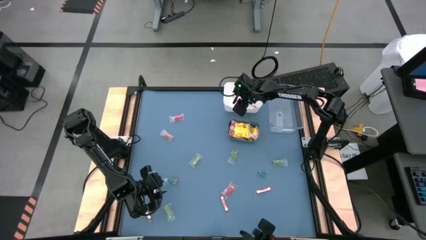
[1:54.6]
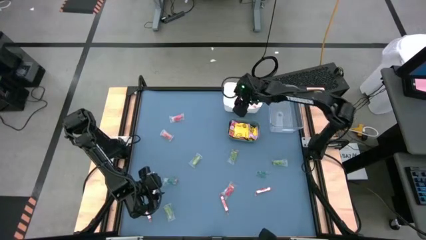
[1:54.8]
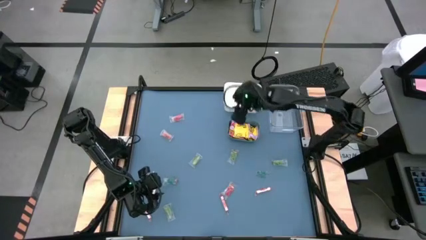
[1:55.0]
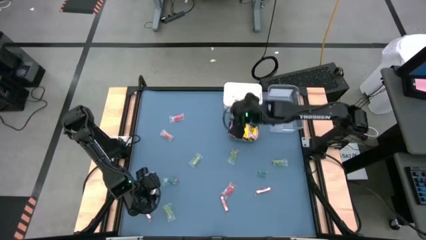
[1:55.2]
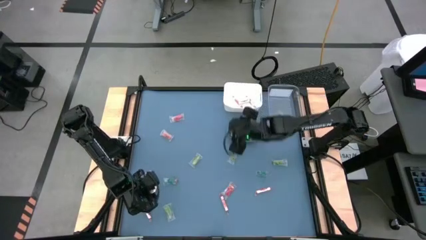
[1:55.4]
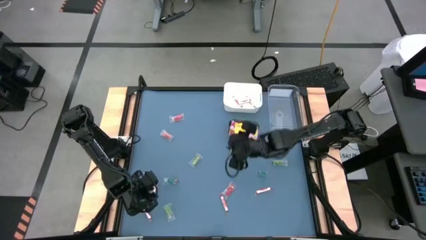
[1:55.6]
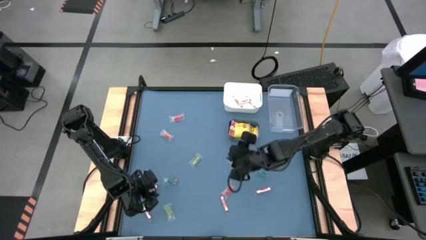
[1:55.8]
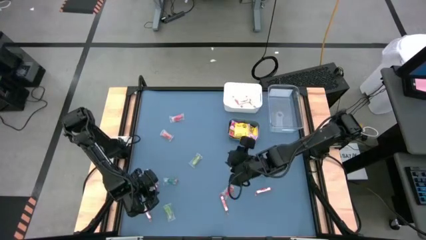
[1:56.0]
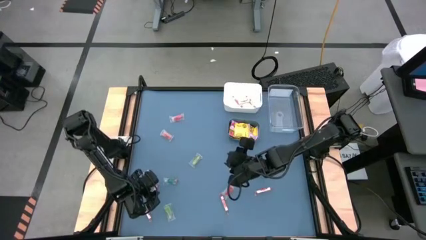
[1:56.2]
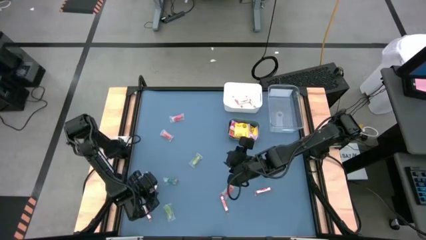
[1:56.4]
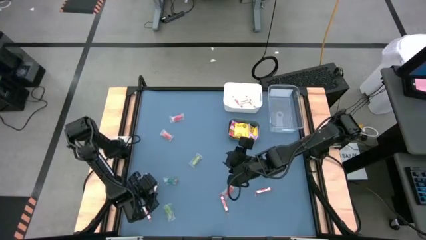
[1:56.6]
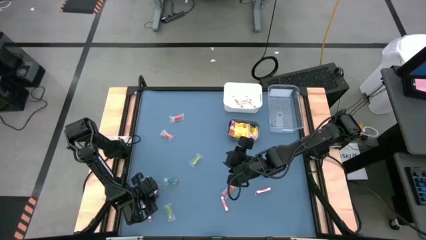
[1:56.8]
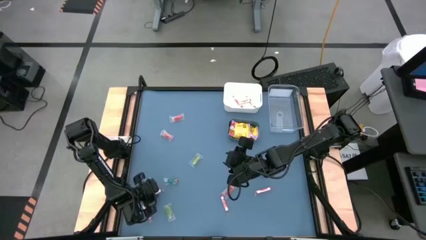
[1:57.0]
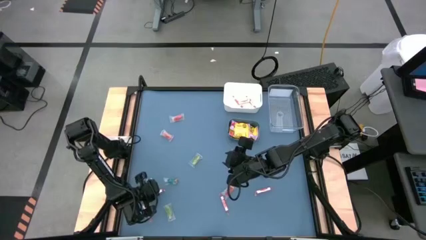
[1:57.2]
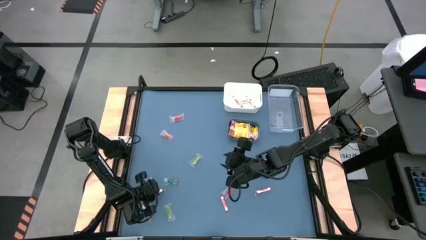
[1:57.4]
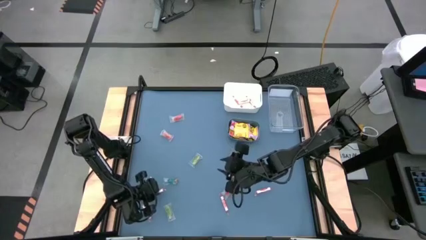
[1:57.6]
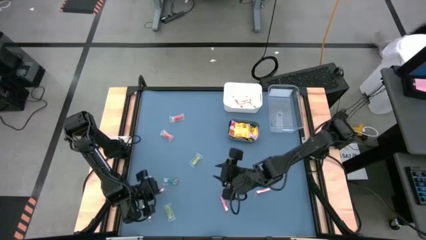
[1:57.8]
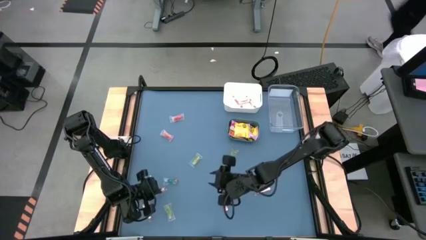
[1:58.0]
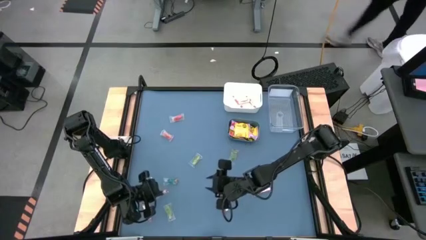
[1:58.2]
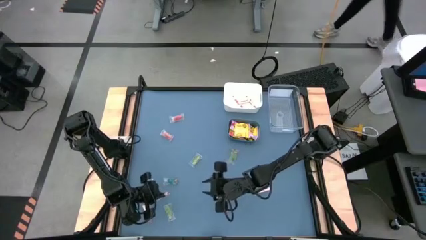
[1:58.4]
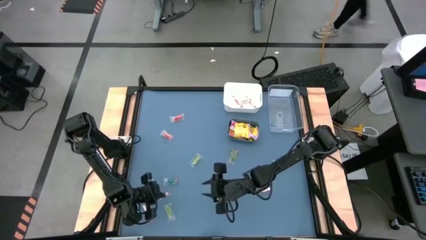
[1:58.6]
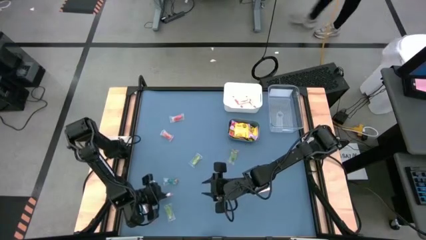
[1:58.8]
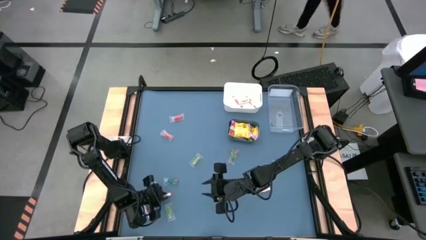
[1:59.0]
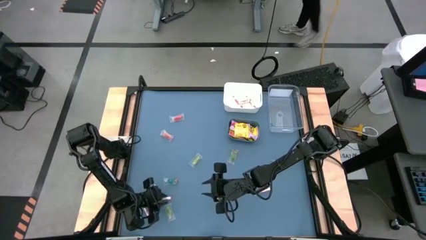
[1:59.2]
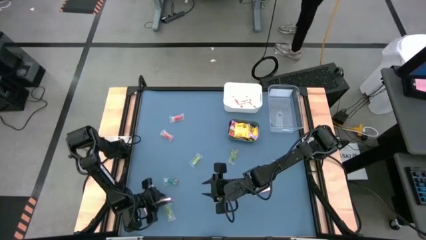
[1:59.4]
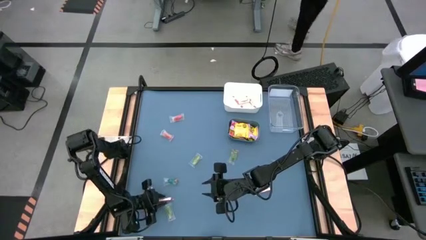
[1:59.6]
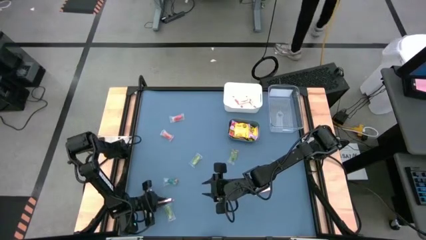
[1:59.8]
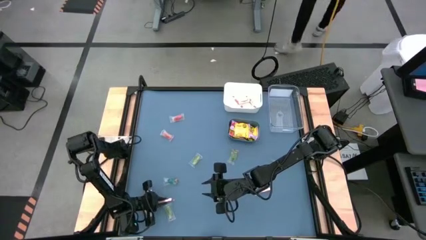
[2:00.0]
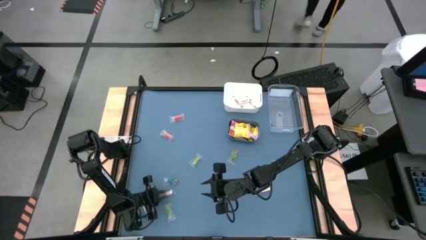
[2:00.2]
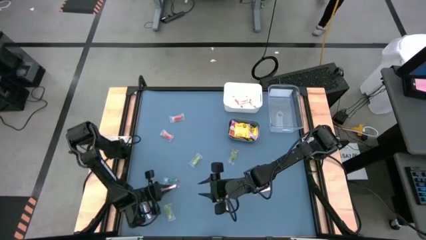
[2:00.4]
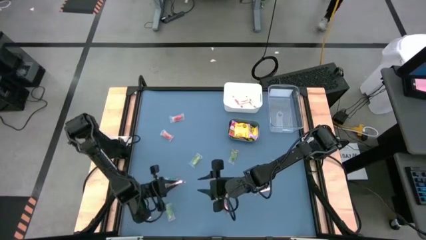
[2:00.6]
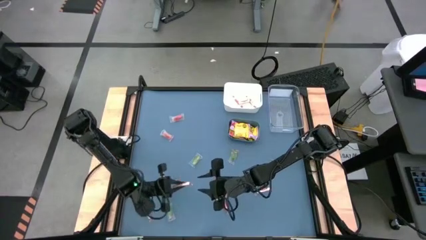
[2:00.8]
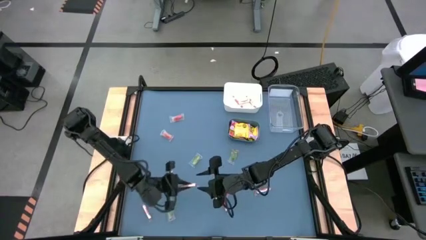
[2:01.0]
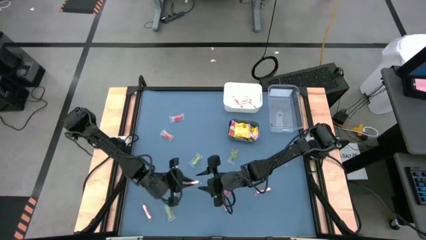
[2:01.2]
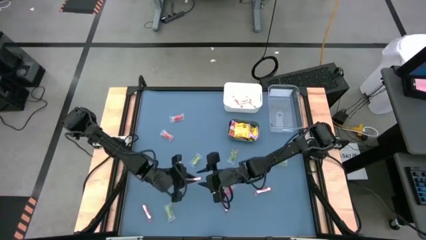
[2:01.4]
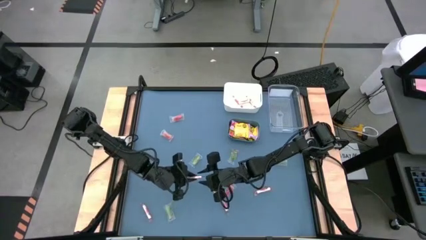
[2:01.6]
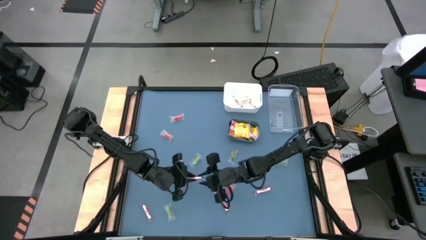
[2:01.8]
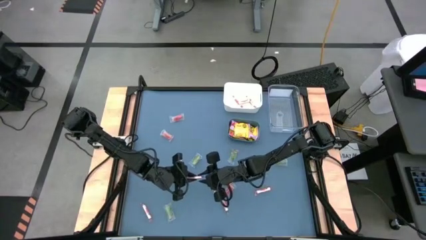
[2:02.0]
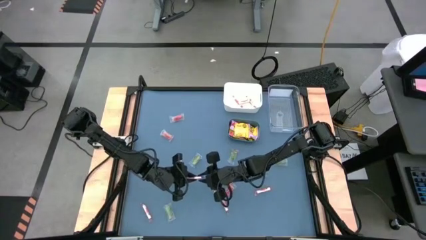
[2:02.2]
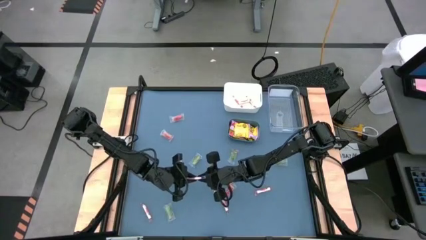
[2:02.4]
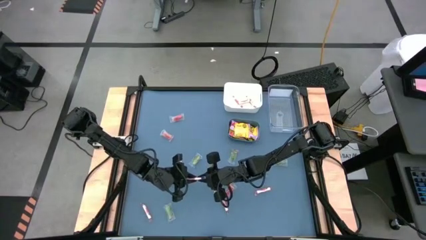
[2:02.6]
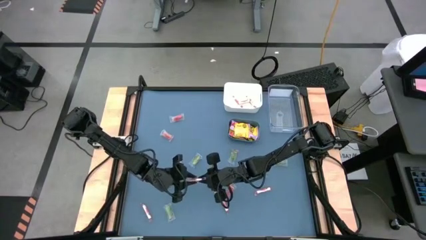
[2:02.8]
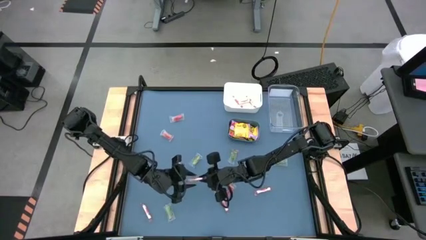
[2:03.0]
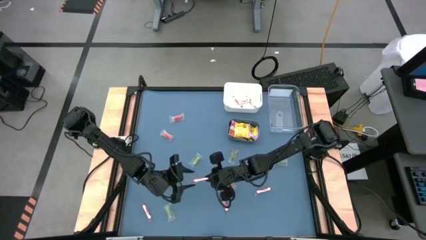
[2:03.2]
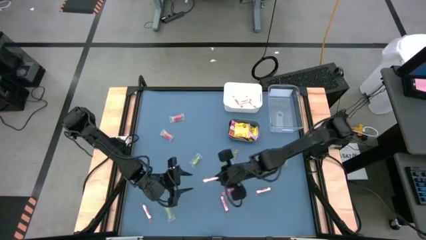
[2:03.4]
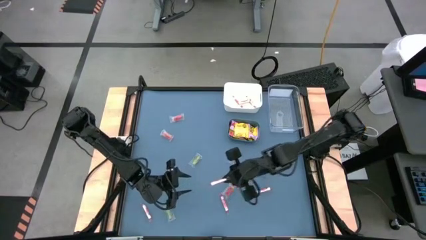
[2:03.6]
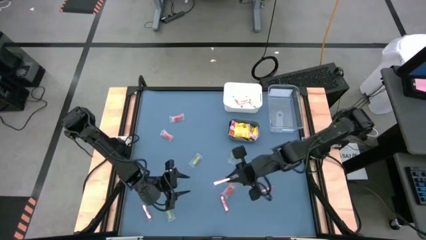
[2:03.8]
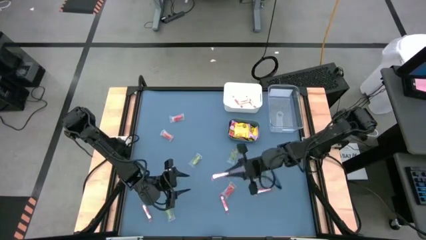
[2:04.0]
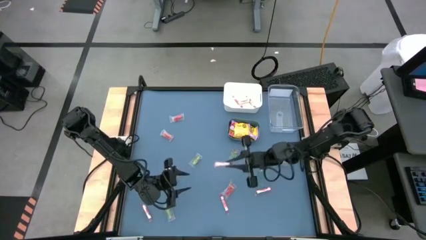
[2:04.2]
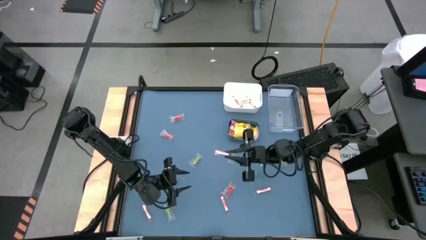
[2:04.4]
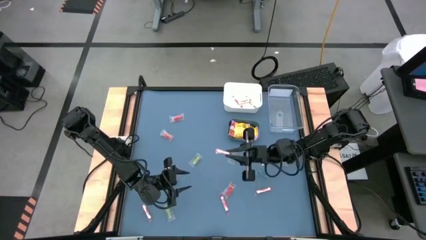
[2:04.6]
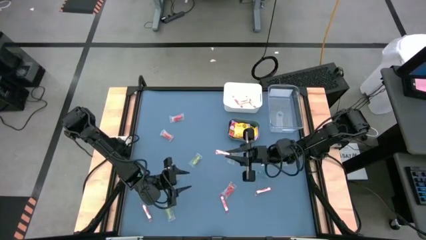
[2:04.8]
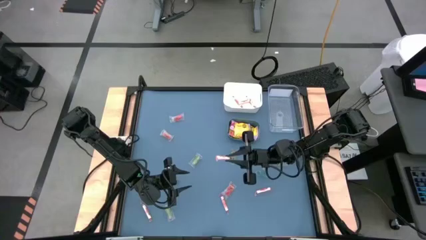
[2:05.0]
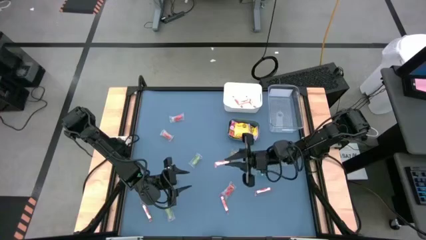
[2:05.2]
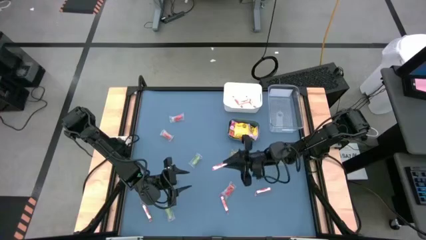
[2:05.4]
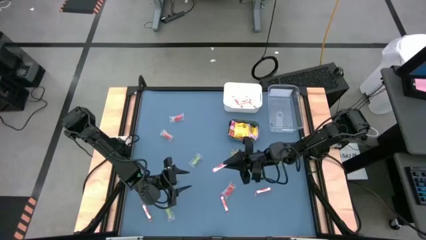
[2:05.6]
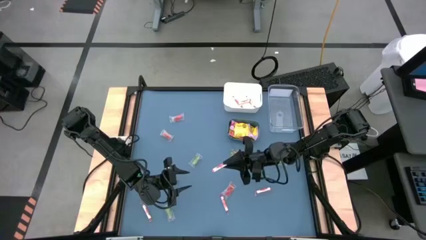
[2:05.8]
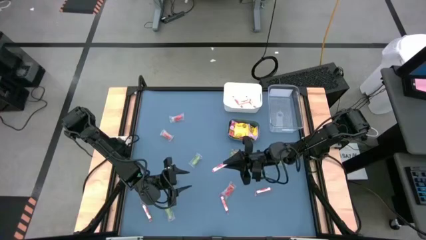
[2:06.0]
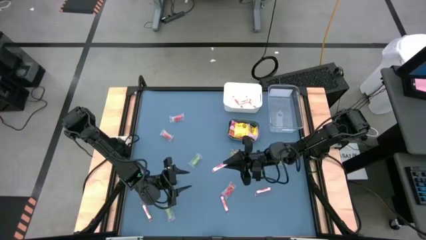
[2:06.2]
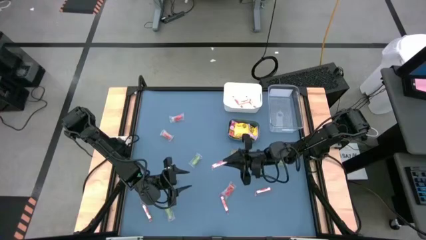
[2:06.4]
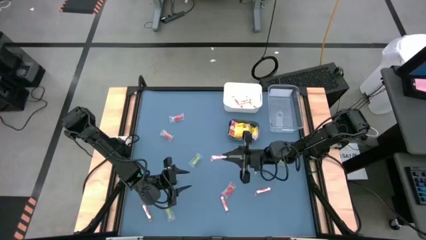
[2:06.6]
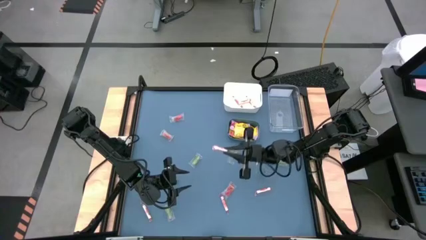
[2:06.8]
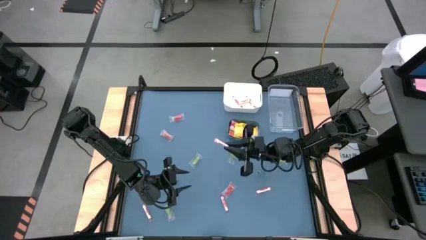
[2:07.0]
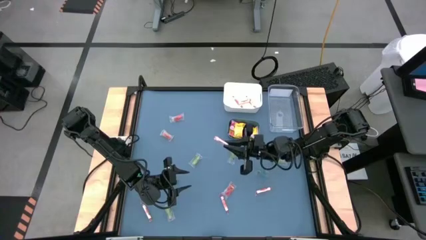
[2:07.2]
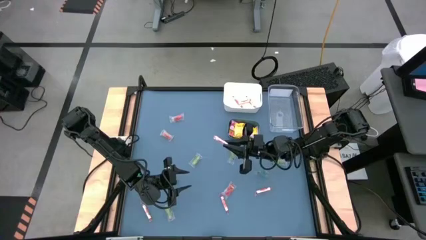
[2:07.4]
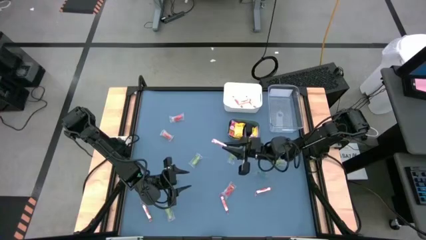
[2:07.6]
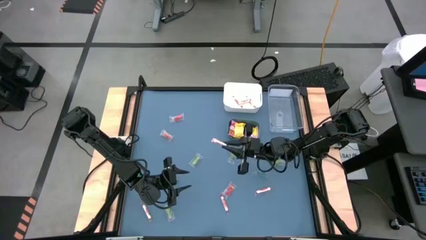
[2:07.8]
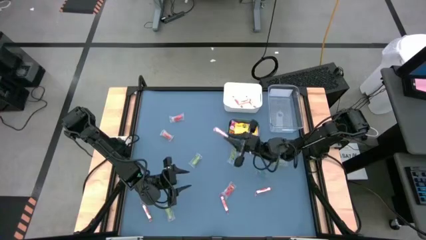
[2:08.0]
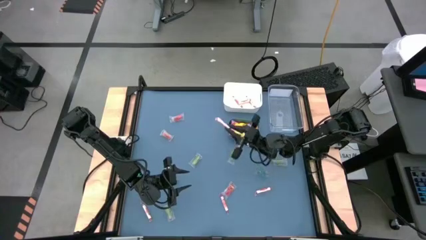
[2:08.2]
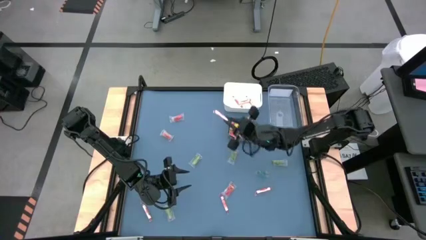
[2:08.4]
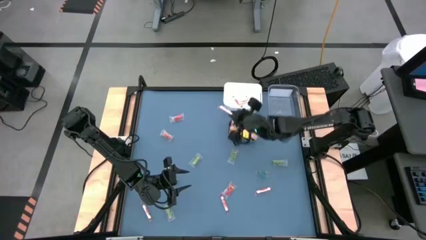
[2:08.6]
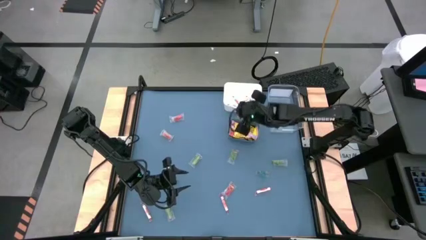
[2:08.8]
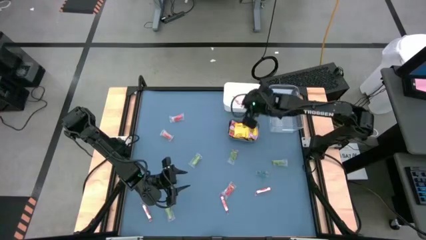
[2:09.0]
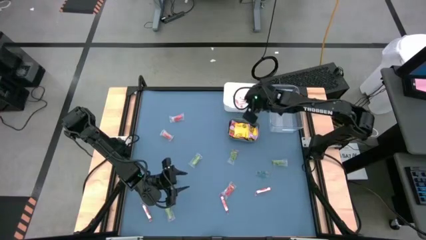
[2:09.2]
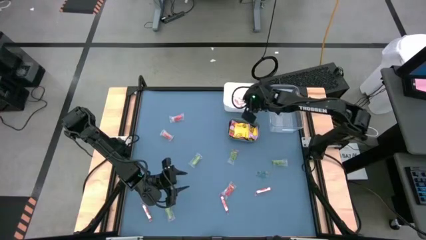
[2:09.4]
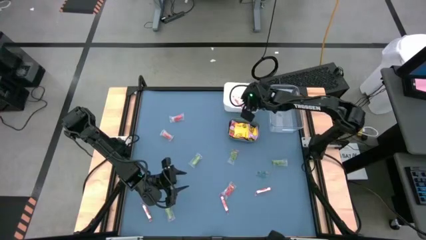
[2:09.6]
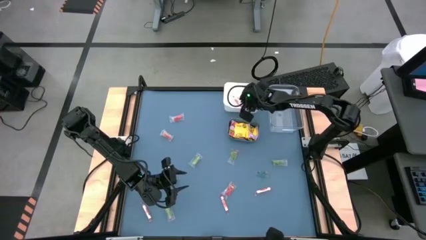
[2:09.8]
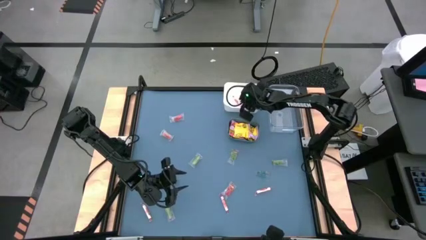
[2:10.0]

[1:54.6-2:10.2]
Task: Sort candy
Put the middle left white candy into the white bin

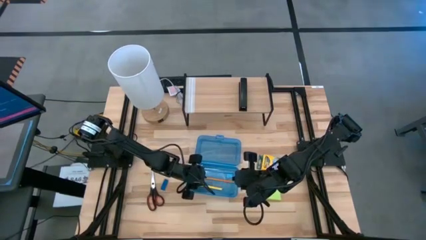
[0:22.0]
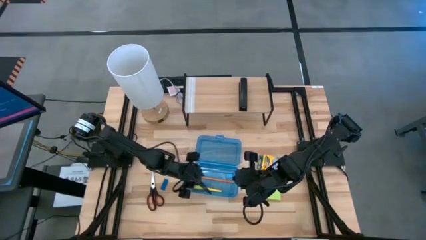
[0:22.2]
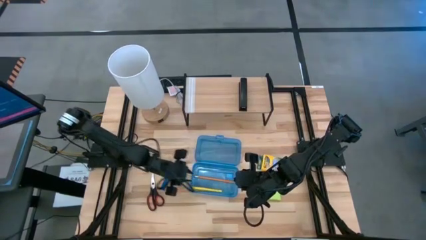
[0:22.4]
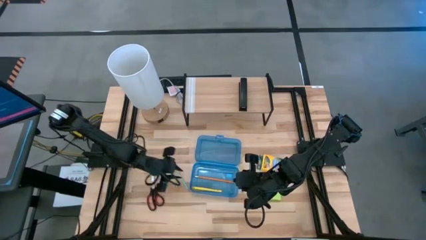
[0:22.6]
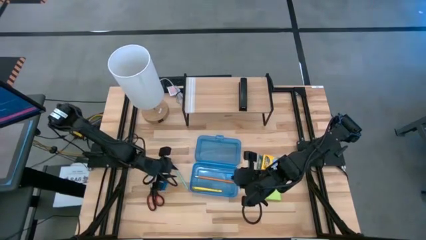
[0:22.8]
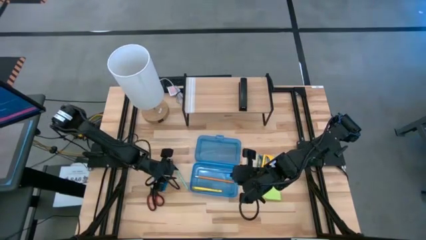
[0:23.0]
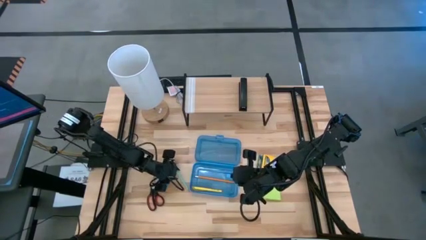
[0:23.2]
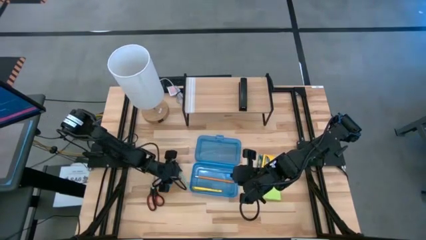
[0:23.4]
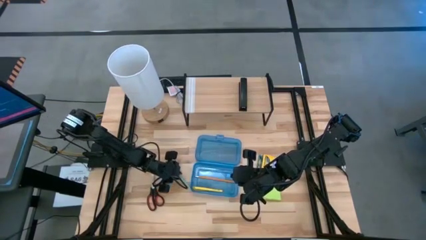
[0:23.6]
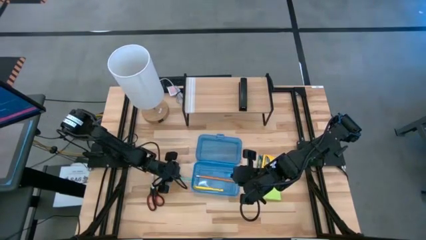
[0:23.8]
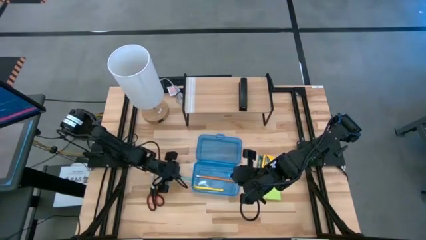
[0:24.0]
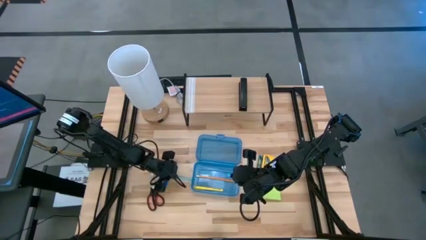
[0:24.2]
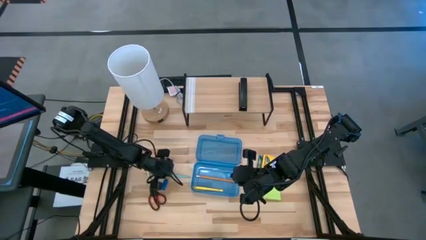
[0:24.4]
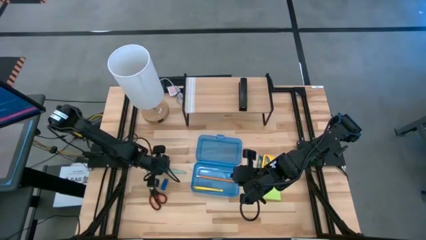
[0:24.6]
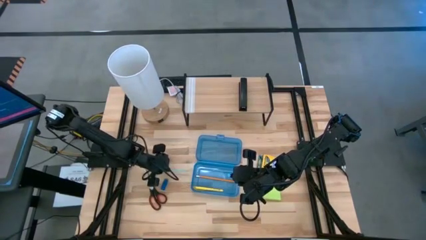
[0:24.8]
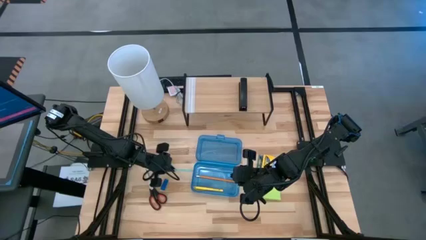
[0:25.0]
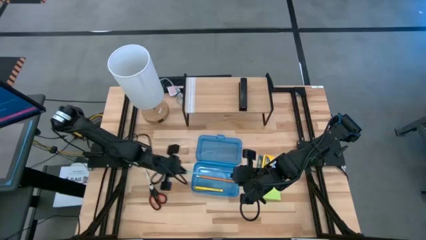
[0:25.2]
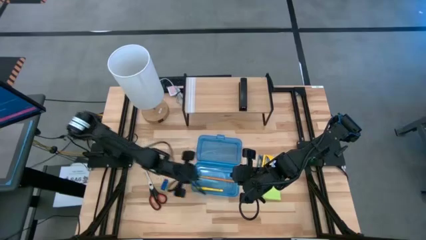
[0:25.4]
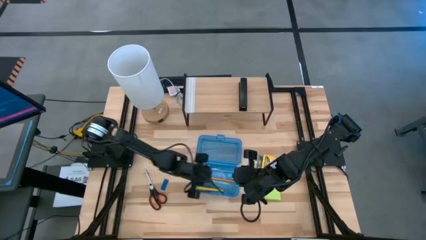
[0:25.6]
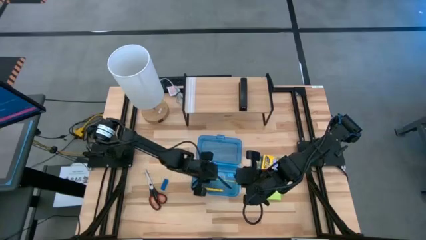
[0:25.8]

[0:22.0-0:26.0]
Task: Pack school essentials
Put the blue pencil into the blue supply box
